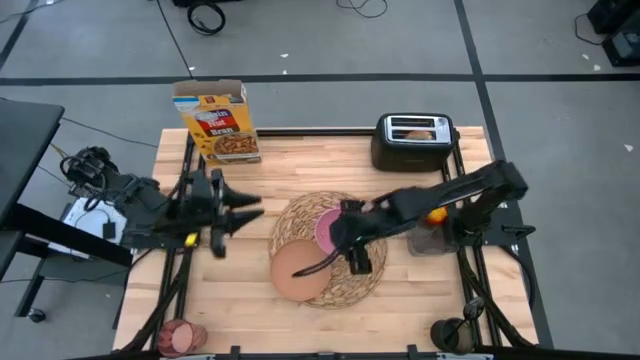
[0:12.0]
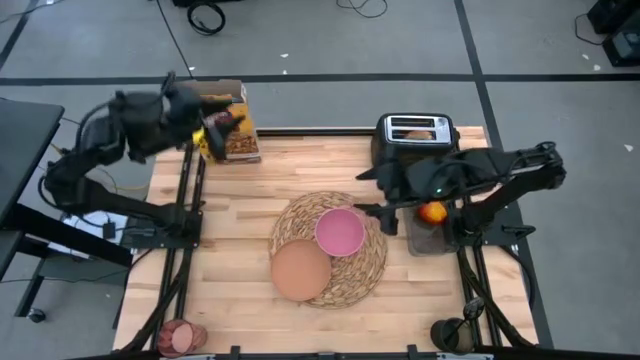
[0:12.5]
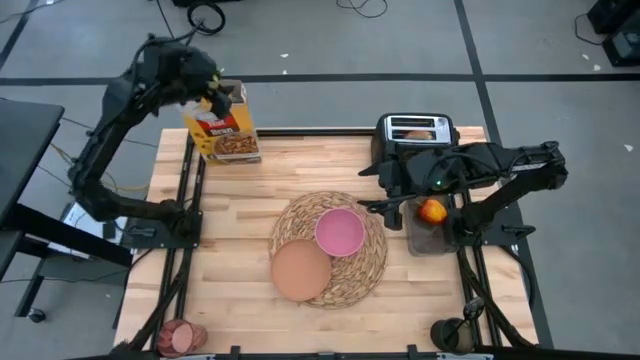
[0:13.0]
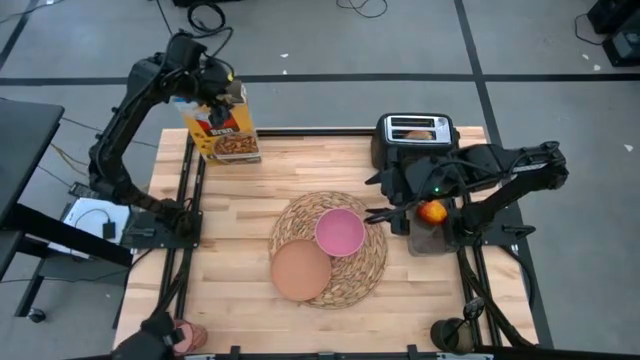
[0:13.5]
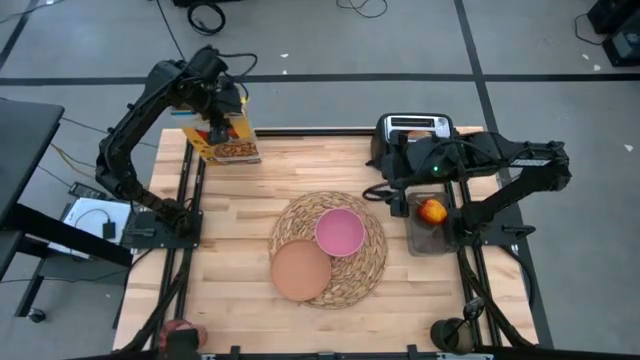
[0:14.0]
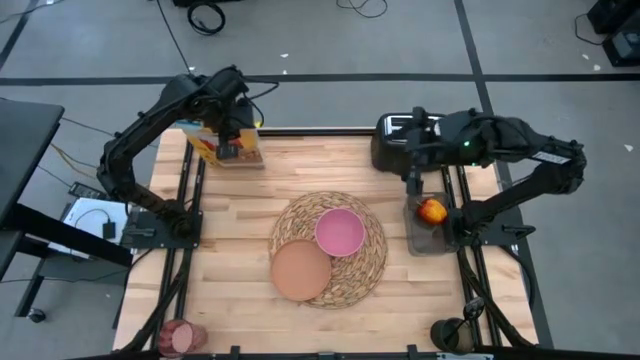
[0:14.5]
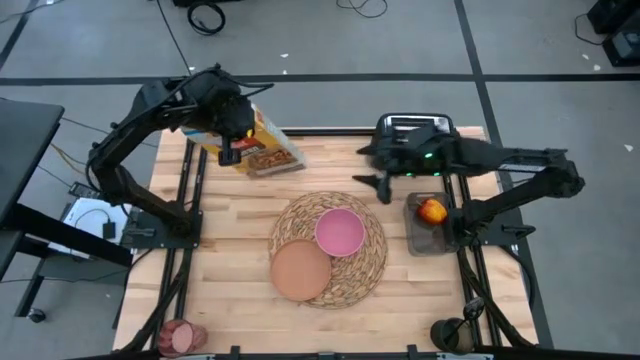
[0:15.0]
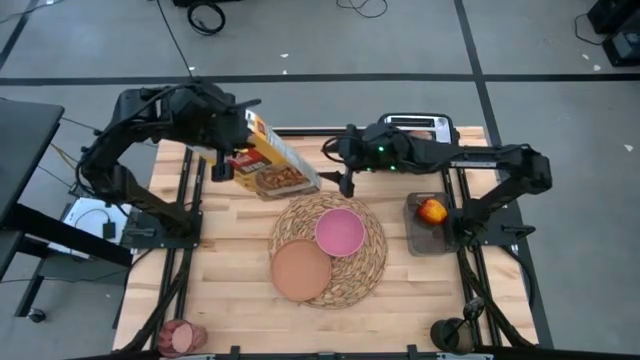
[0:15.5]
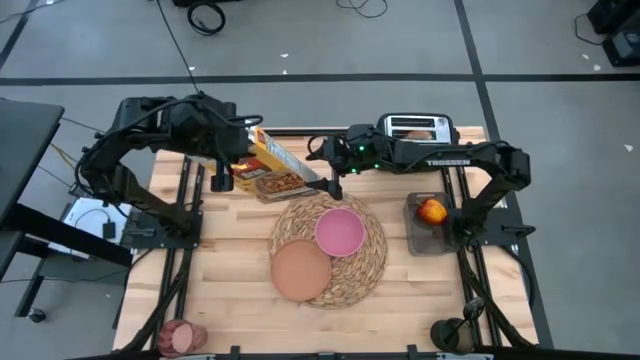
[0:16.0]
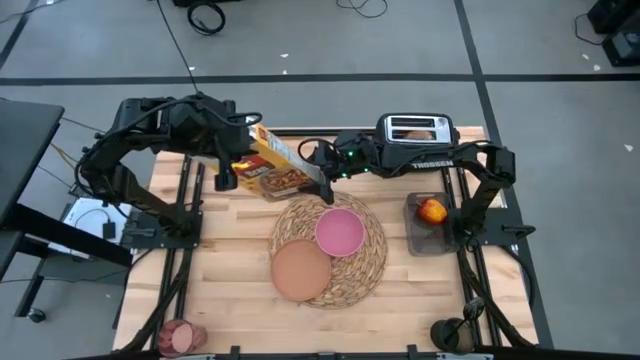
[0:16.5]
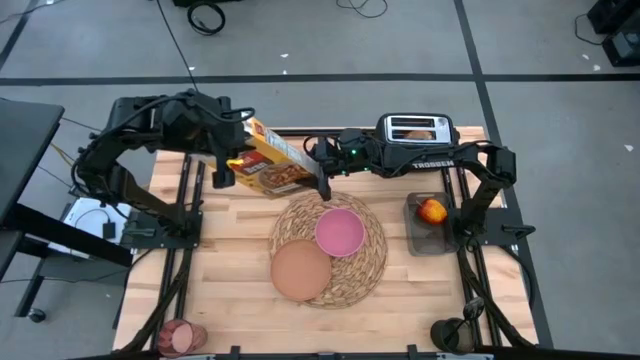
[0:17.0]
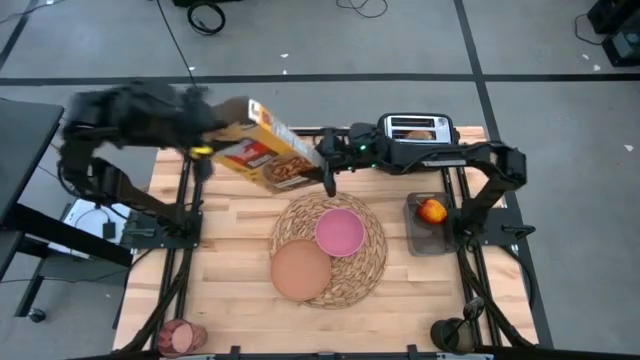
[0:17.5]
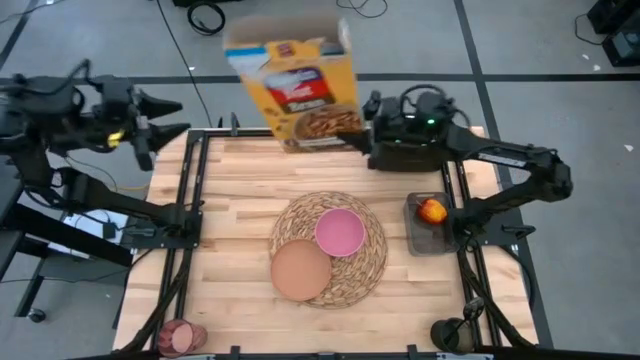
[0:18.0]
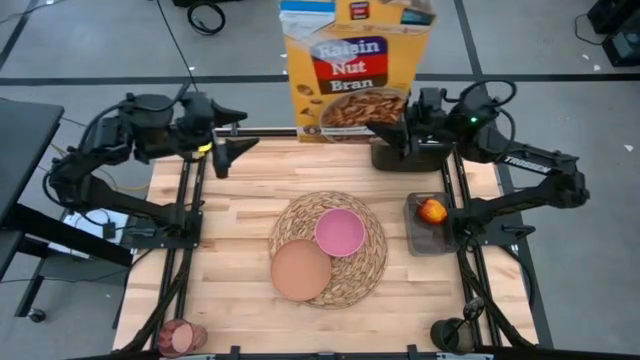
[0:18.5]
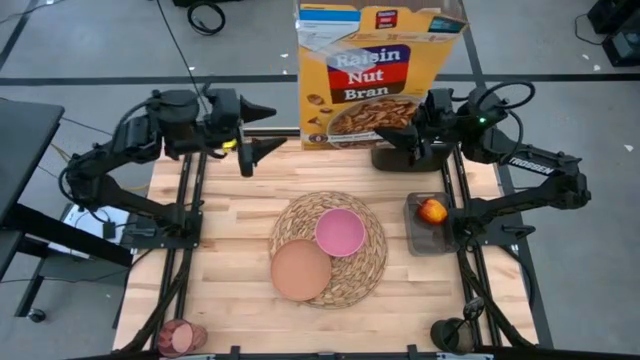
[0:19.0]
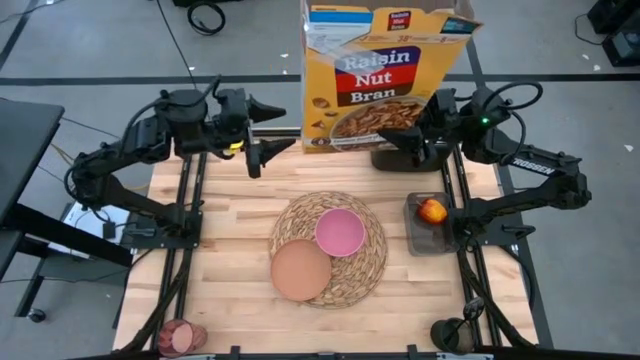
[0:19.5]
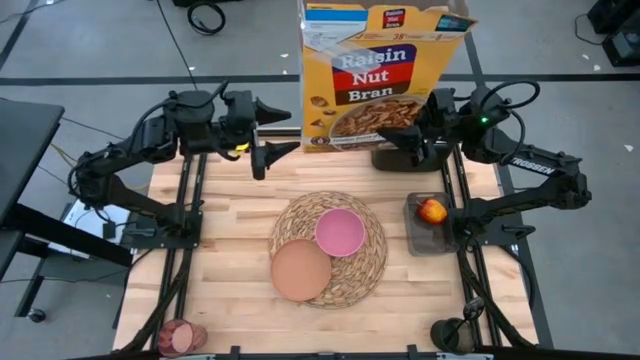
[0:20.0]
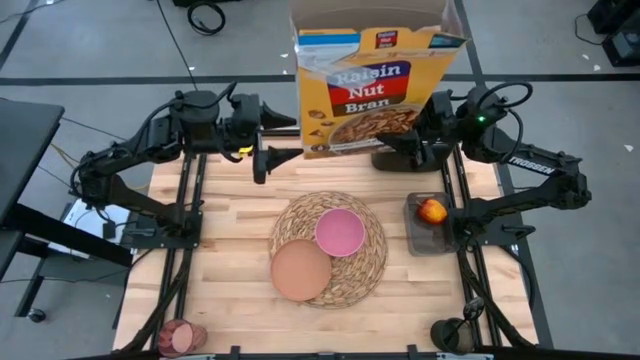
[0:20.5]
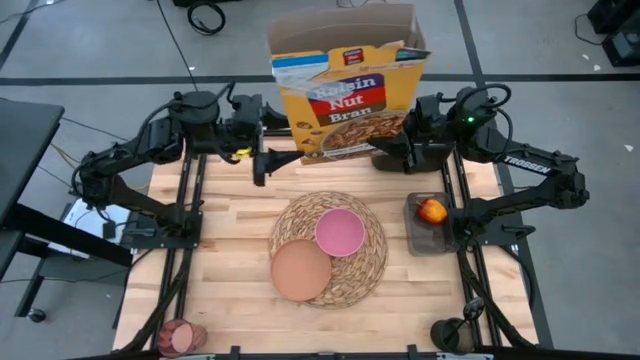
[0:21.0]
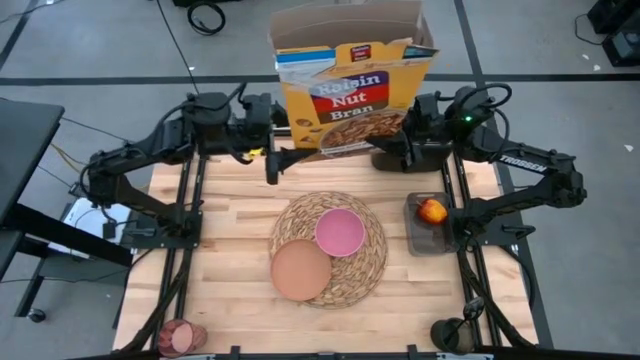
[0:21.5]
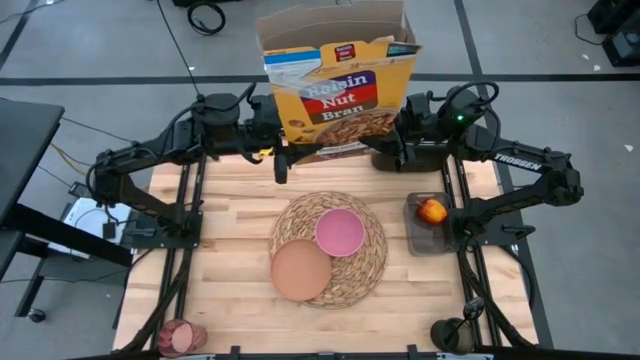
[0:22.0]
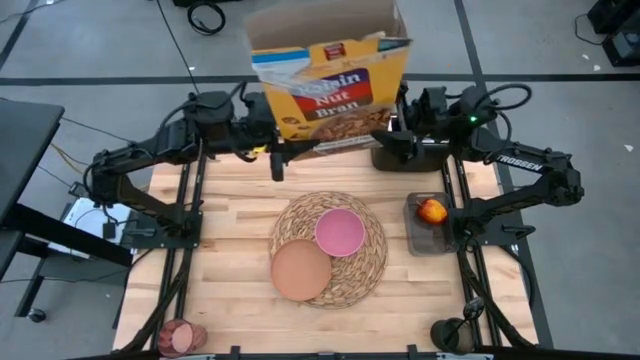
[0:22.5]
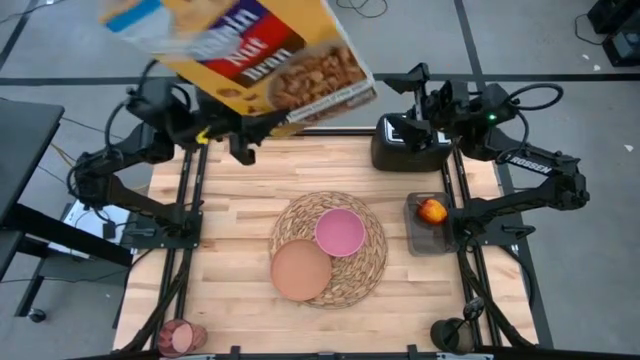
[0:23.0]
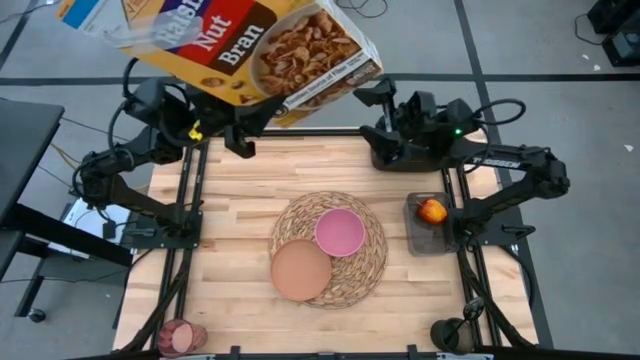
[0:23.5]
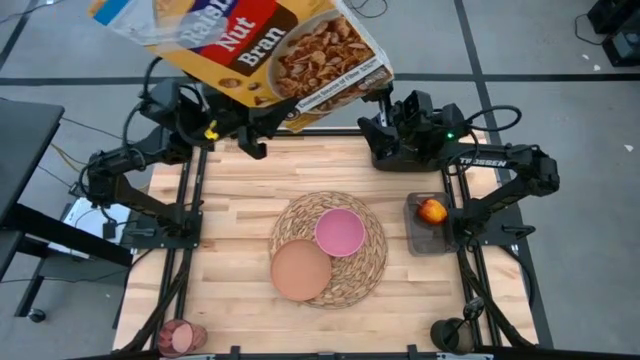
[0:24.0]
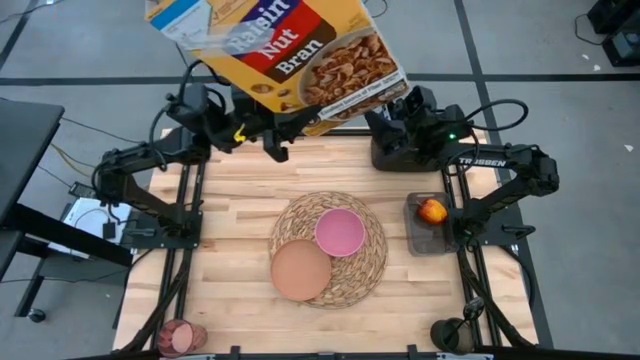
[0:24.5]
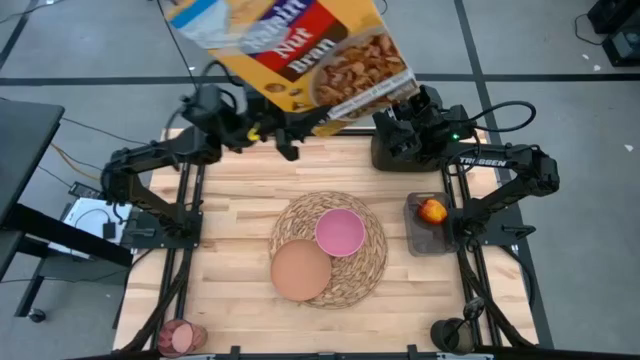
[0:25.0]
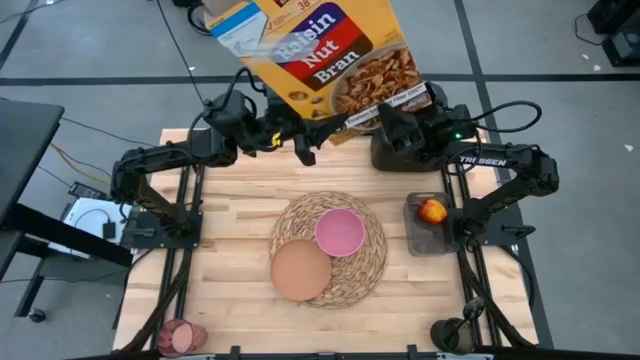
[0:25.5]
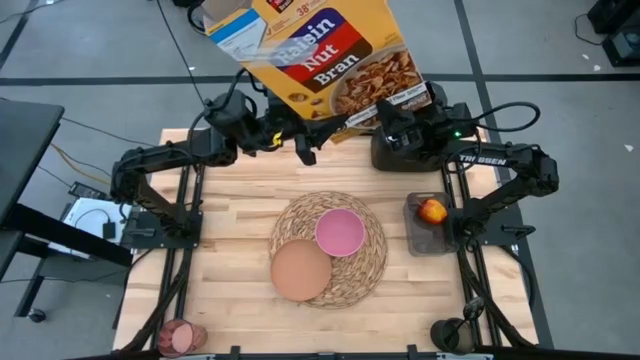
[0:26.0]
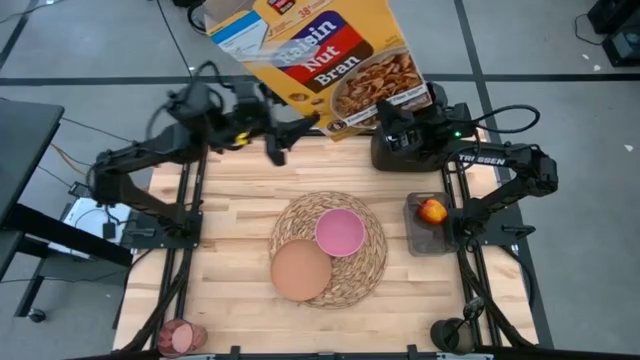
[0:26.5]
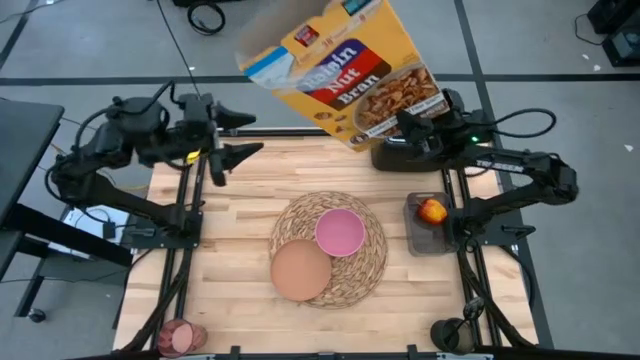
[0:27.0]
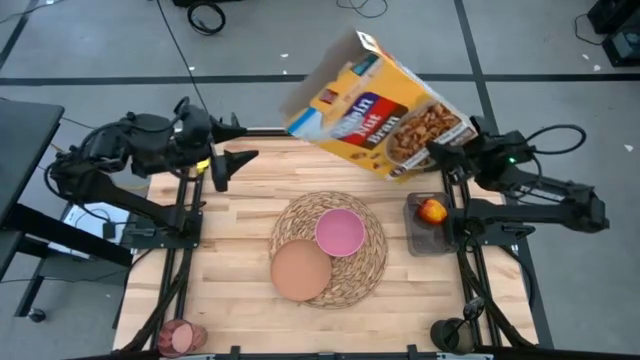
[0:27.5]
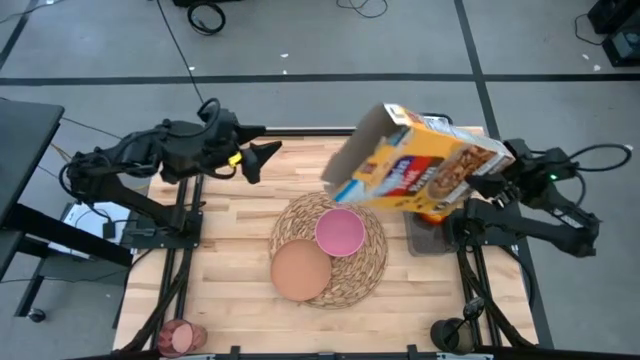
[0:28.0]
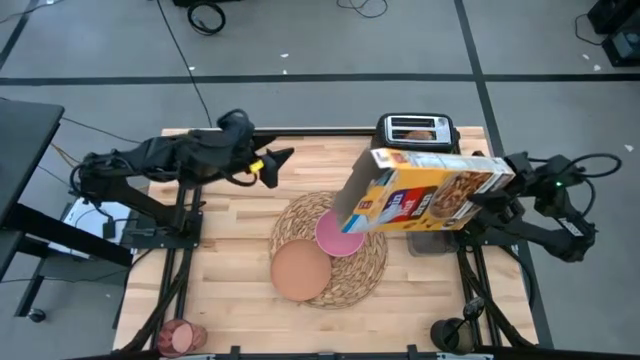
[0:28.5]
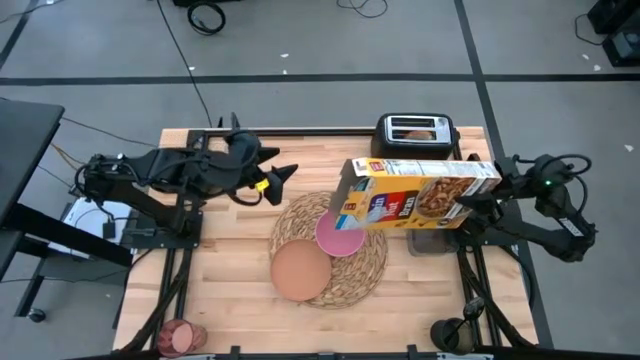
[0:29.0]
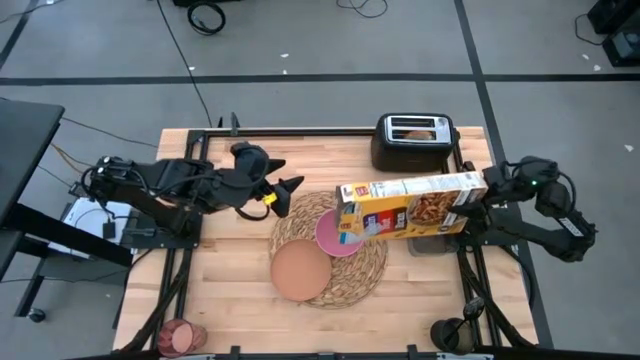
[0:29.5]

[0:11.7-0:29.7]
Task: Arrange a breakfast setting
Pour the cereal from the yellow cereal box into the pink bowl

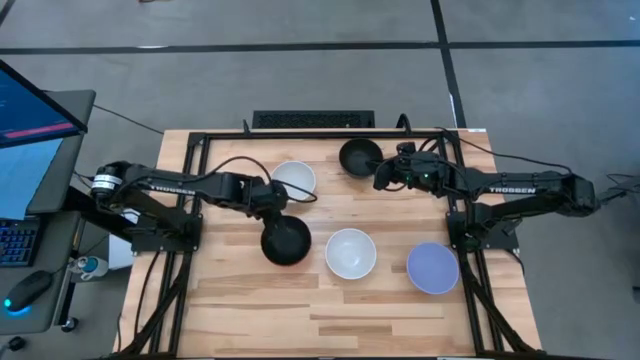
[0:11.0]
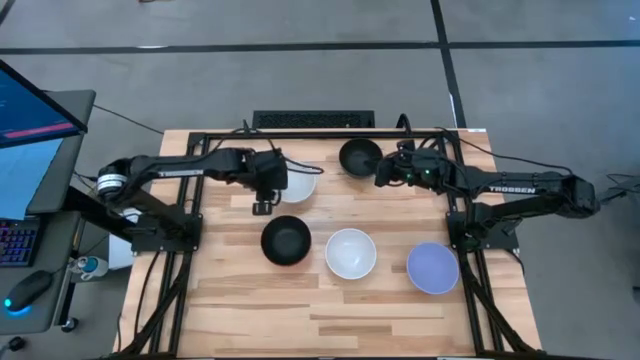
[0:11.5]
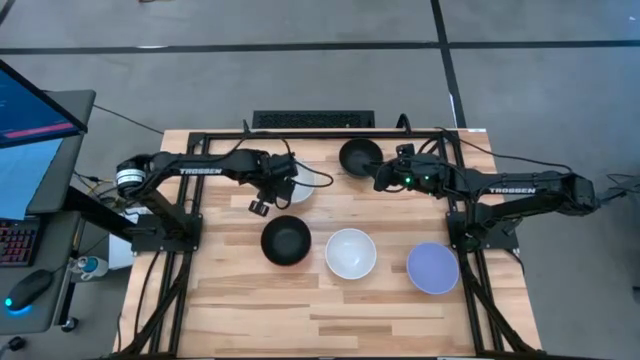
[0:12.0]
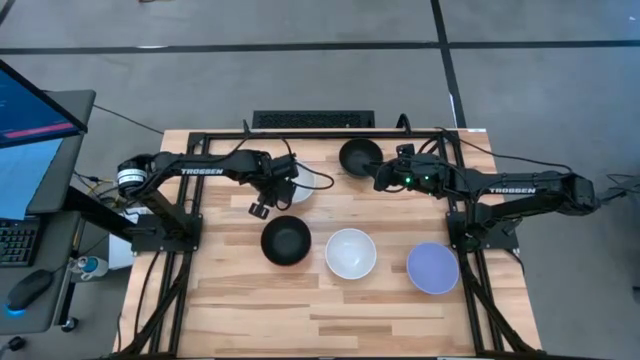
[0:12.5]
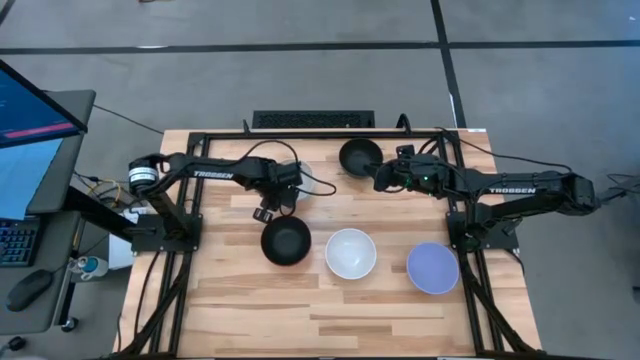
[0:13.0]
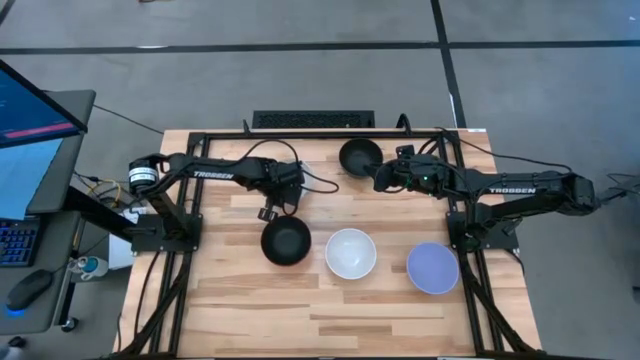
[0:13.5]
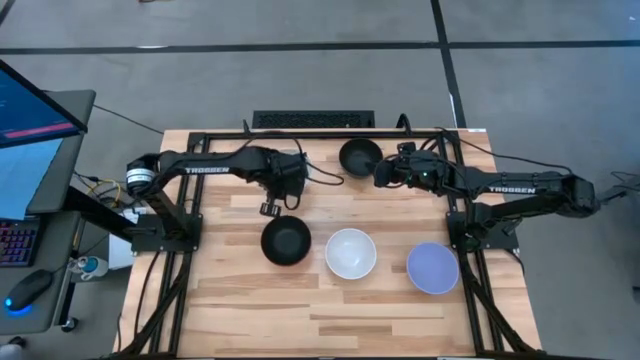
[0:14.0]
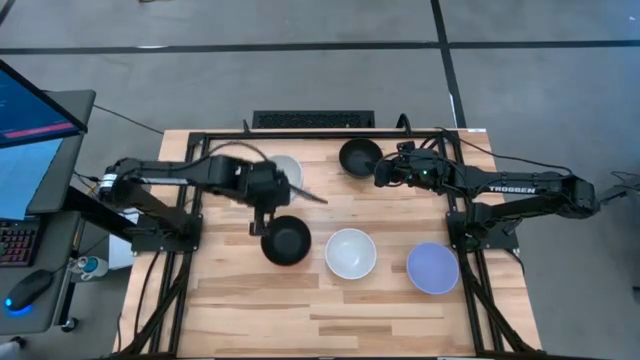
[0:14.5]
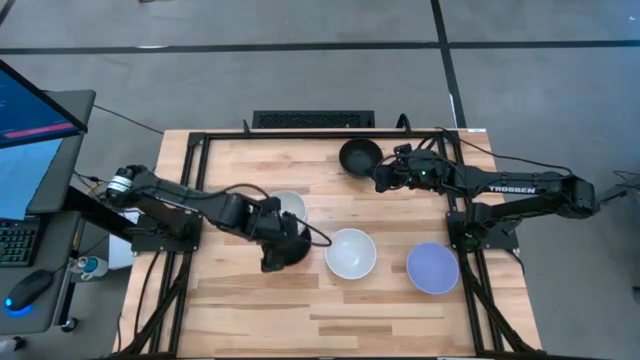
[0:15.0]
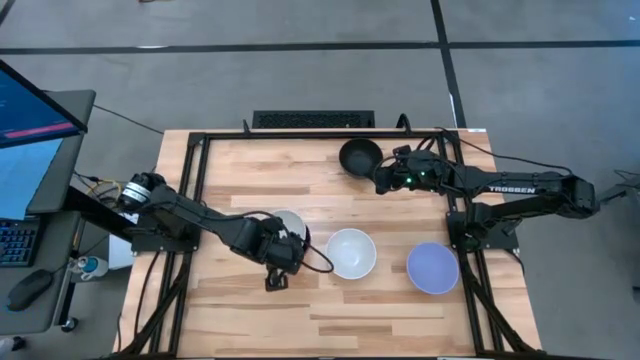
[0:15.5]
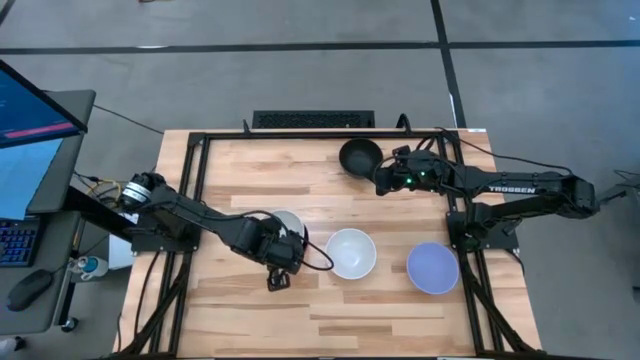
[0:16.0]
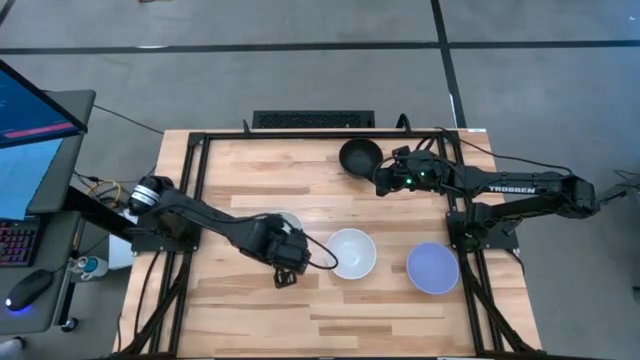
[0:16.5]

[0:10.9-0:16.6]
Task: Nest bowls inside each other
Stack the top white bowl on the left black bowl
